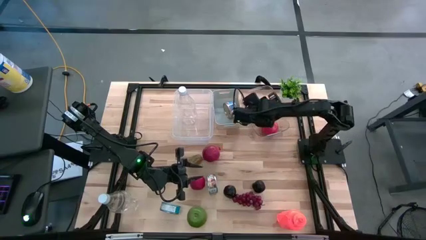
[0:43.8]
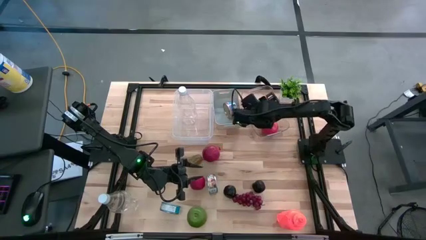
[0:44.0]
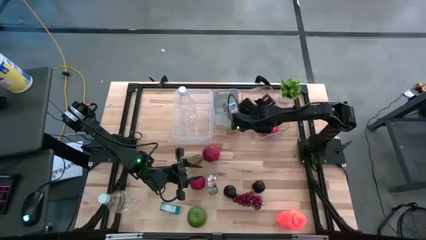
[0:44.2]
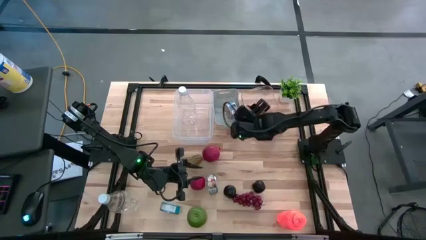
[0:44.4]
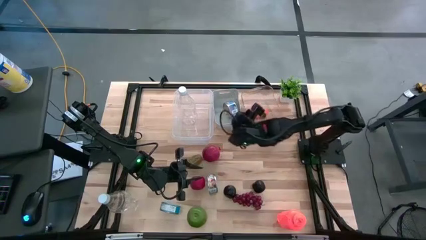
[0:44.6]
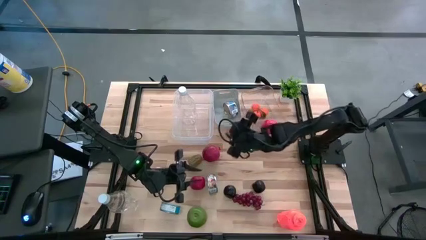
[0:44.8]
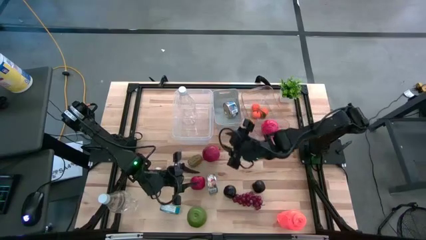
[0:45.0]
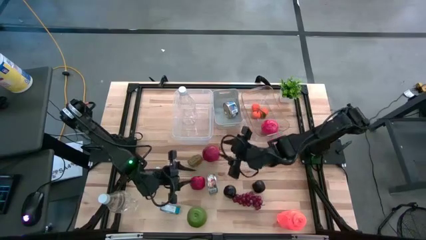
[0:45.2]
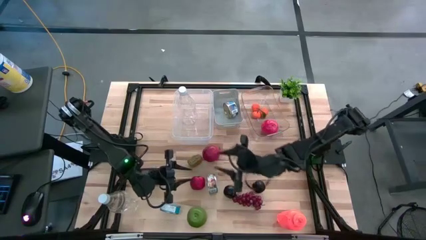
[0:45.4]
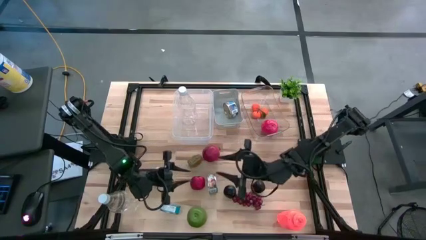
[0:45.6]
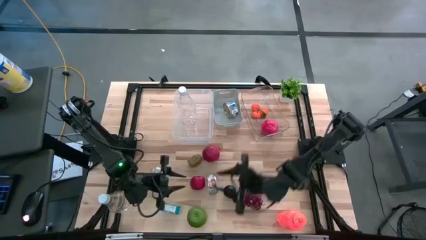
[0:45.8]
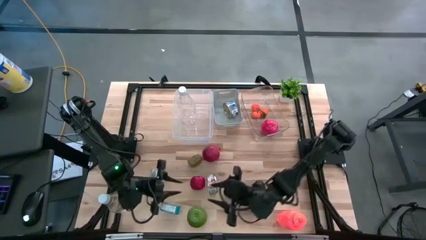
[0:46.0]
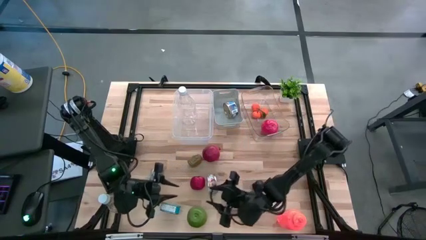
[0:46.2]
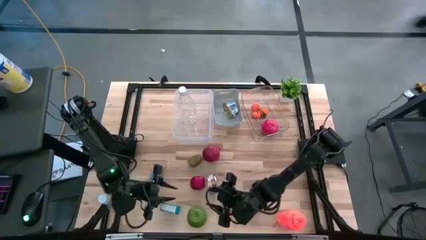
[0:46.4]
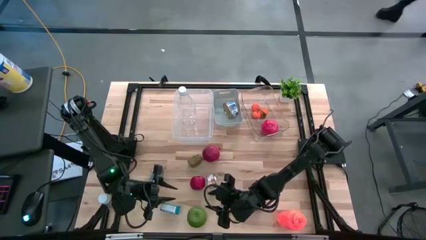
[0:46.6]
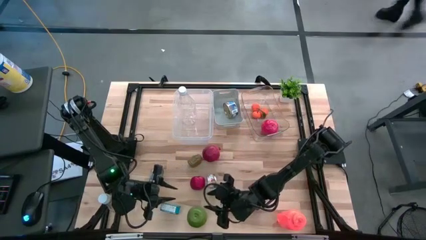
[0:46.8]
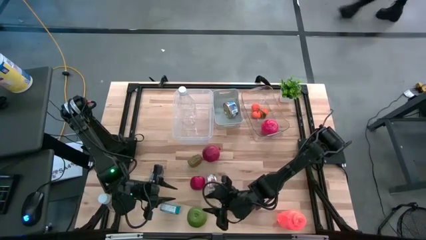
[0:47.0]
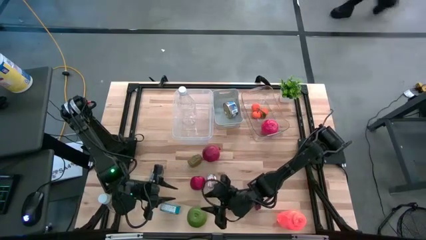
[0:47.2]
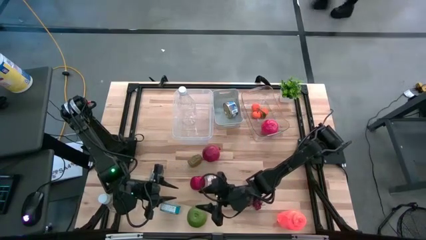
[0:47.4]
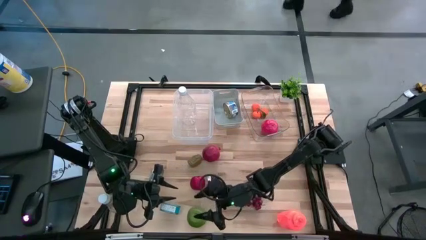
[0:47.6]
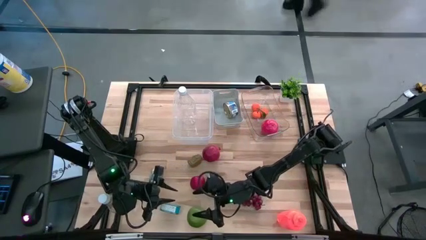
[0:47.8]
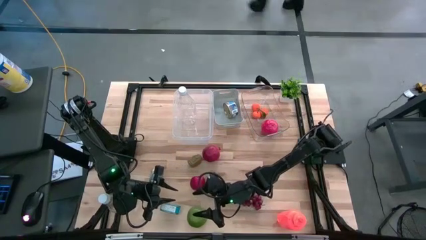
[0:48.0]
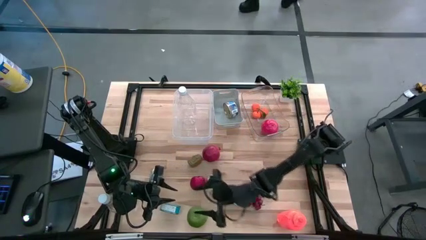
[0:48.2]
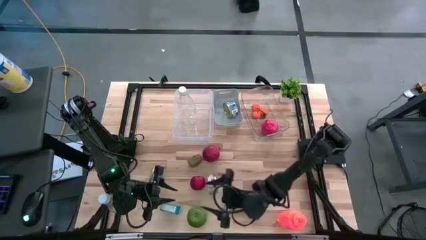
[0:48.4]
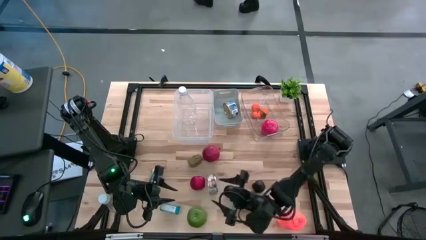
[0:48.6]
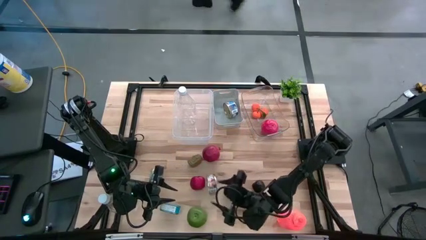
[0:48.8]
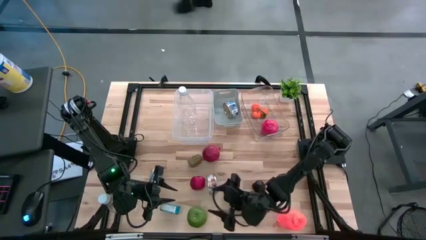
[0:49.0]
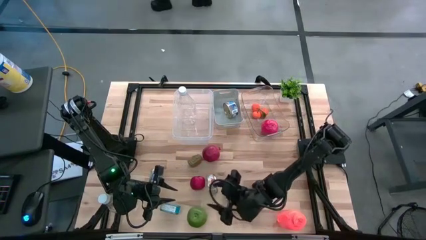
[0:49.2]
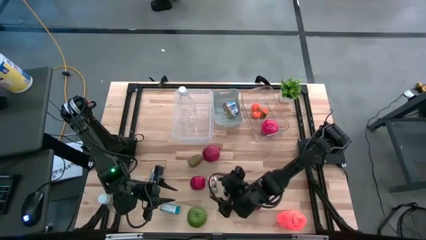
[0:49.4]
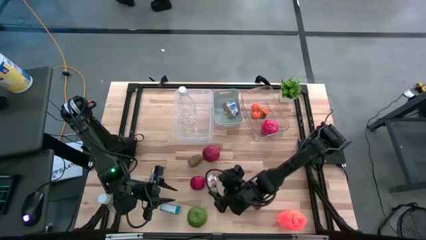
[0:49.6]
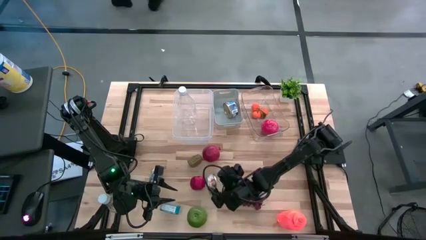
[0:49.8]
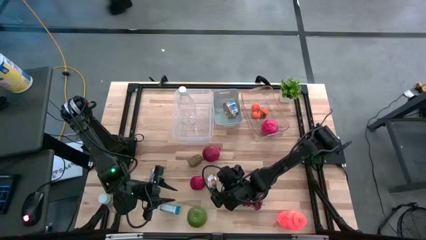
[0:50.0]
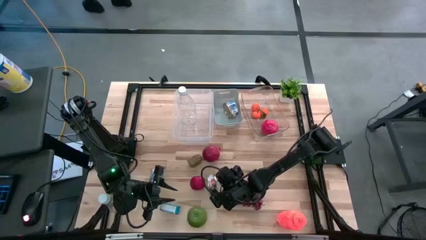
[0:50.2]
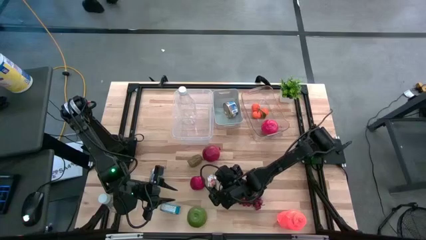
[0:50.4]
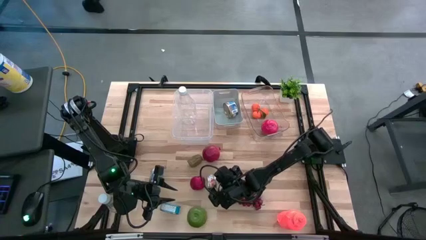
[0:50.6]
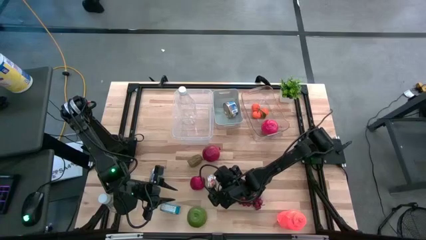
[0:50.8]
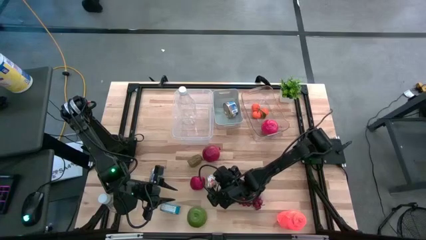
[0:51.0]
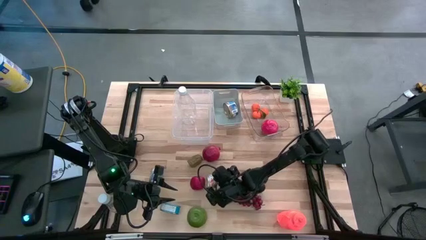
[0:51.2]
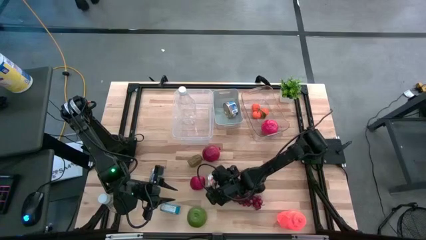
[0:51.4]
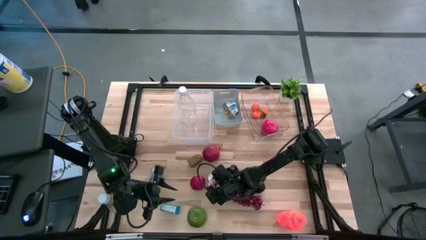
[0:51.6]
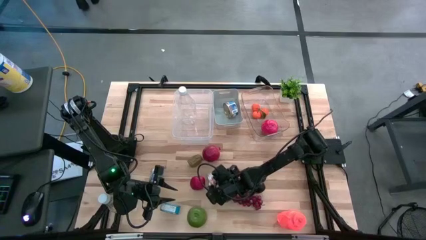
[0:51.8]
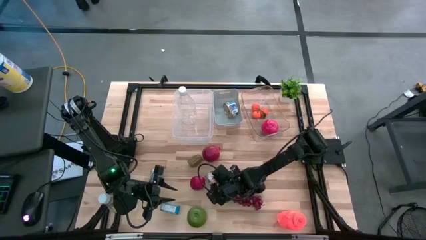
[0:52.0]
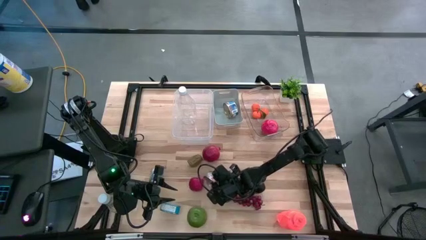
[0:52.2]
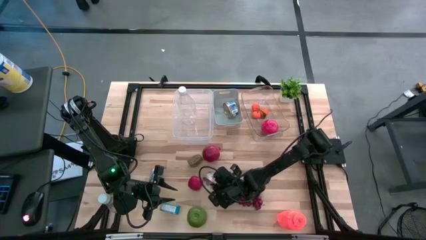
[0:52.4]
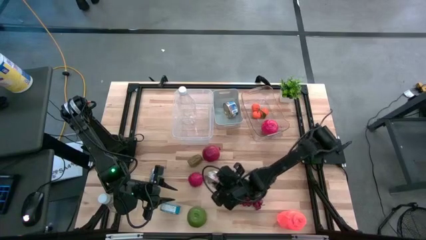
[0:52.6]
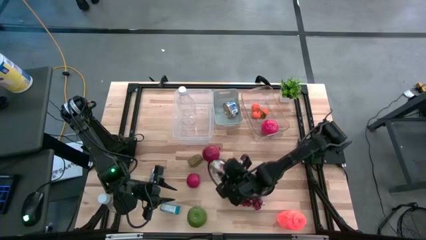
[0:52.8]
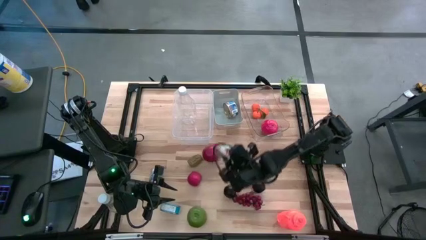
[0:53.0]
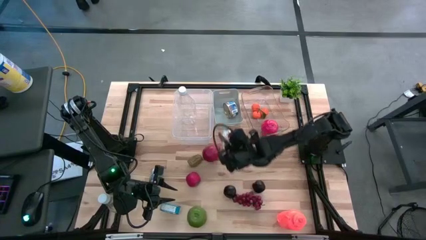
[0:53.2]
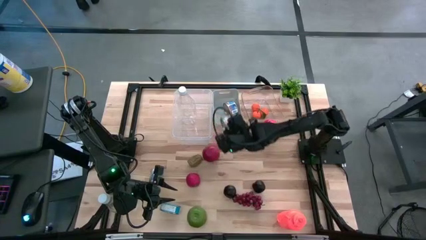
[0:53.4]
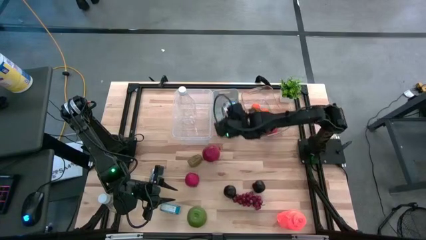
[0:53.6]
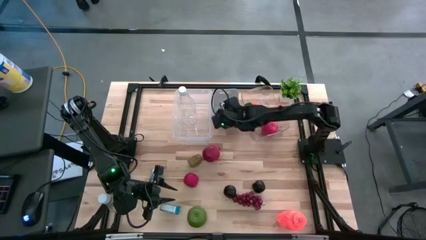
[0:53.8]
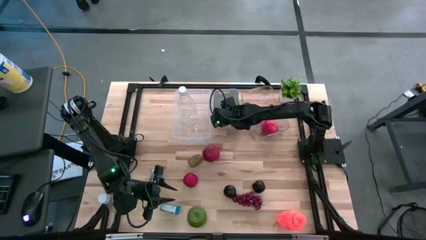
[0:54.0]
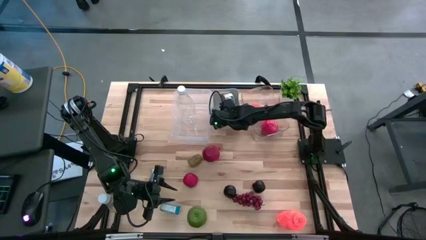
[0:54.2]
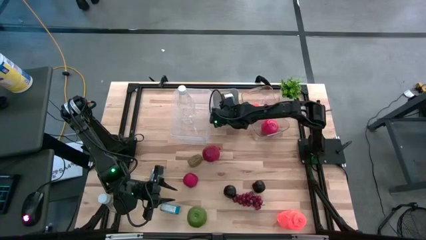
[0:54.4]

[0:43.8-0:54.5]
Task: Pick & Place Food Item
Put the right green canned salmon into the white bin

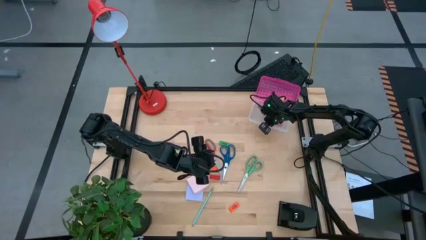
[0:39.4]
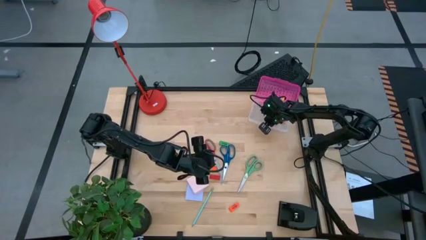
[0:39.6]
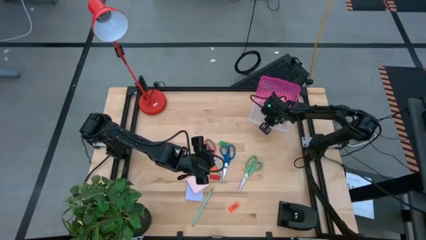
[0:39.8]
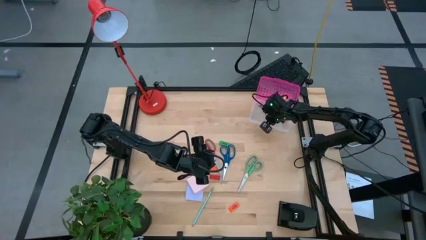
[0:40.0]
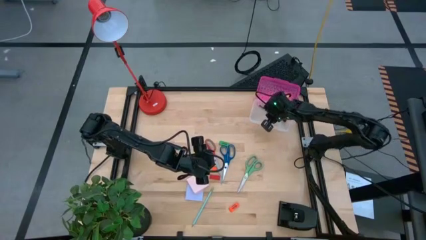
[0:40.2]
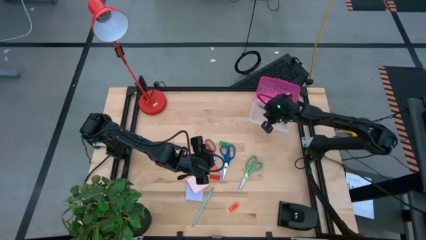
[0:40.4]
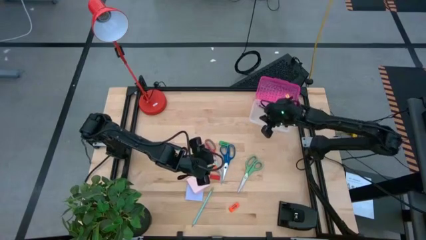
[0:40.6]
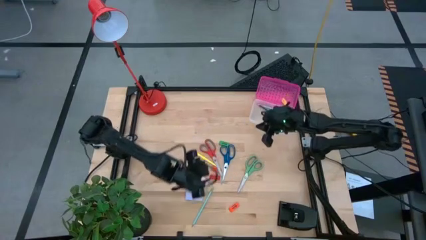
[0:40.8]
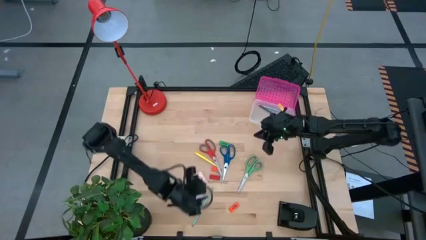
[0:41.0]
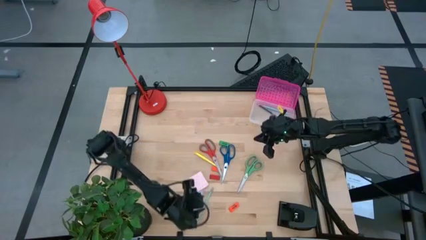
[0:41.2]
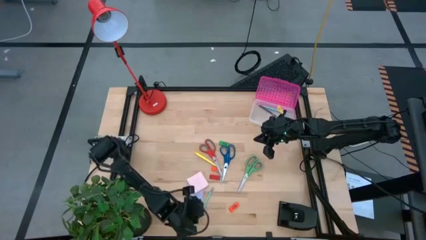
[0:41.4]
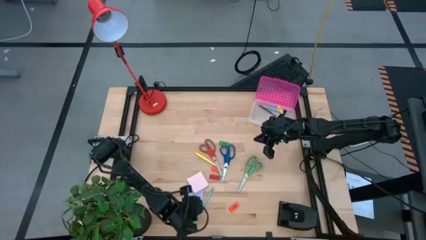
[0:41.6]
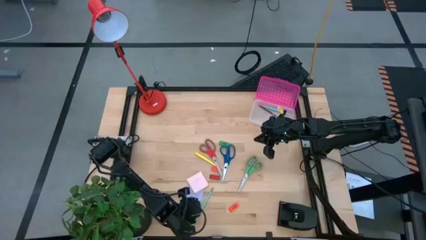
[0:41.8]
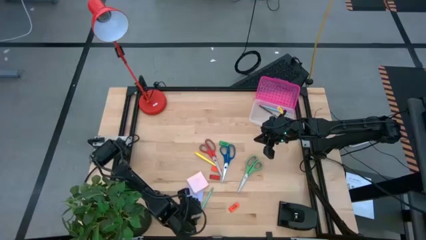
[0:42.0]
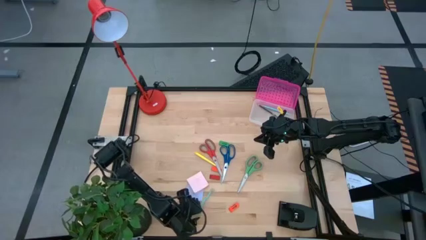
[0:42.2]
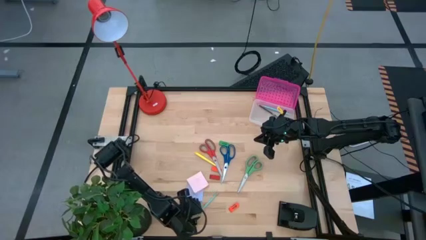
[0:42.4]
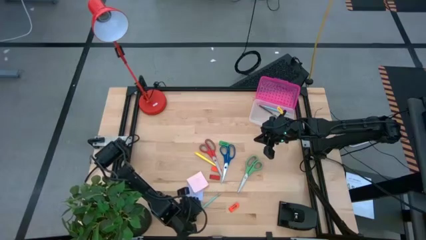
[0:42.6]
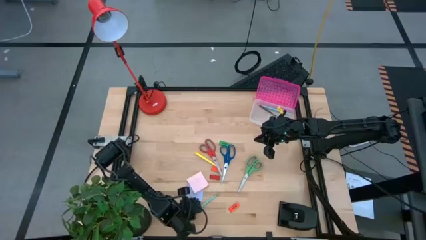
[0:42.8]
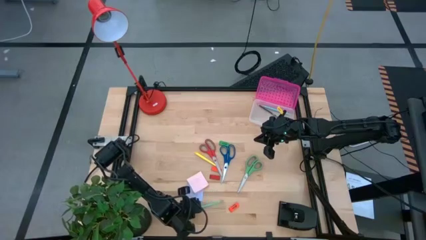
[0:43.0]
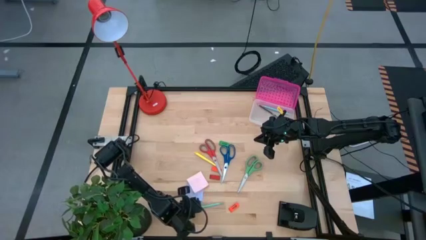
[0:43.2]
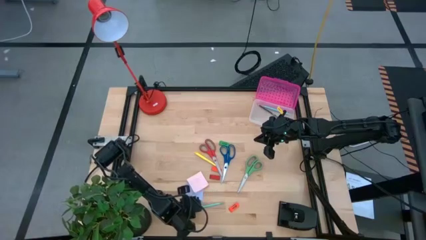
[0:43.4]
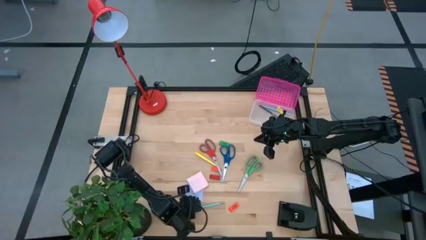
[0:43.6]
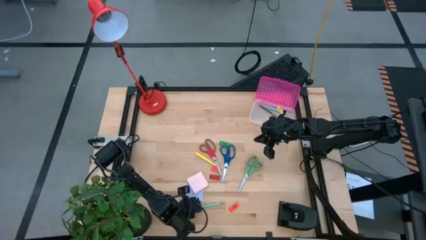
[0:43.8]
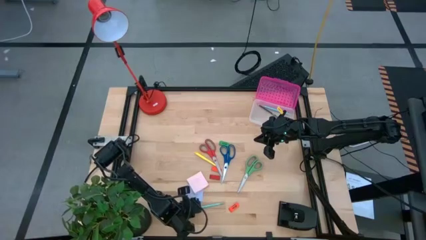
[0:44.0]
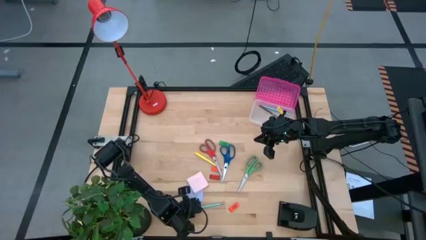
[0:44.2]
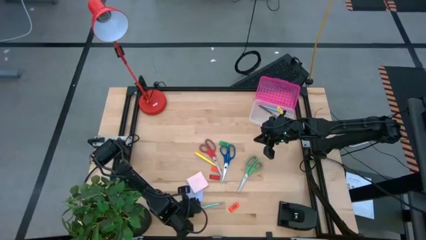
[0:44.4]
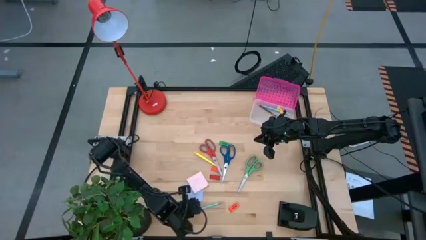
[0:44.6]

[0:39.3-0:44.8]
Task: Pack school essentials
Put the light blue pencil into the supply box
